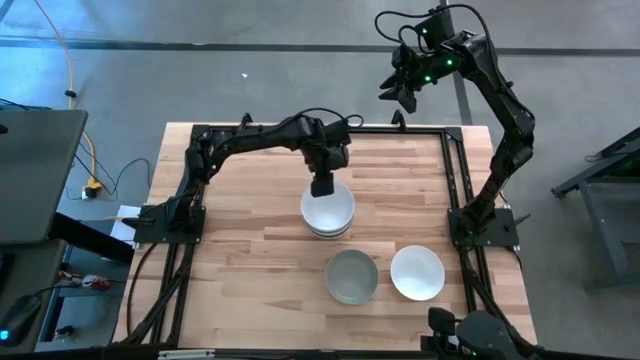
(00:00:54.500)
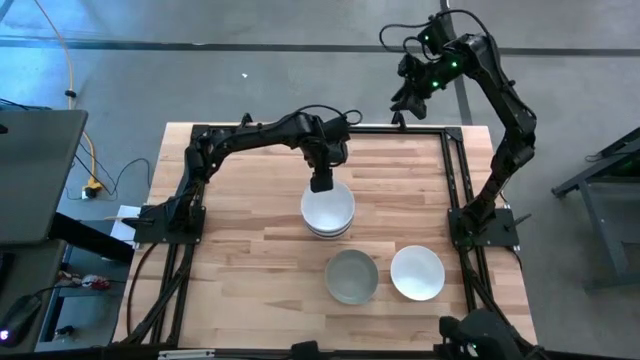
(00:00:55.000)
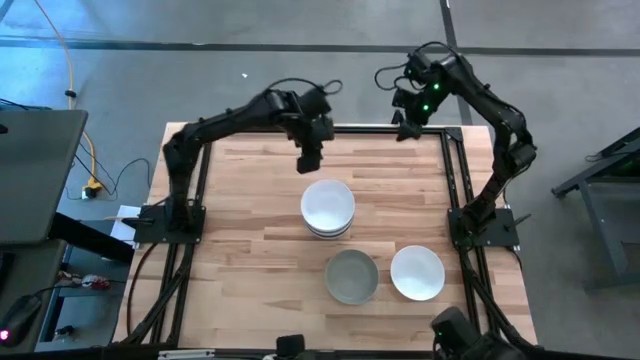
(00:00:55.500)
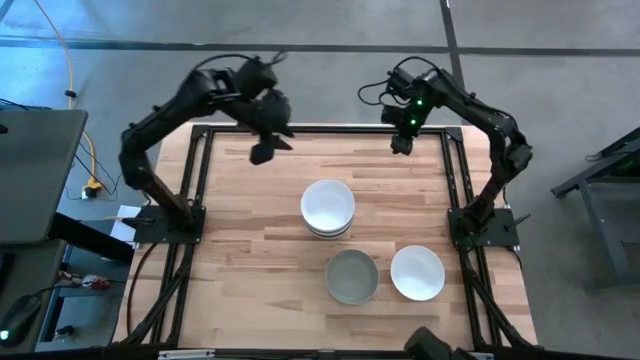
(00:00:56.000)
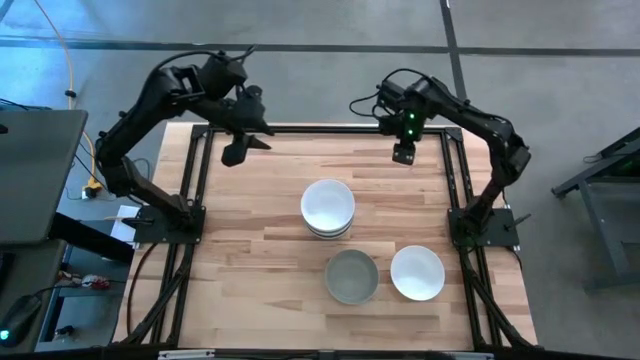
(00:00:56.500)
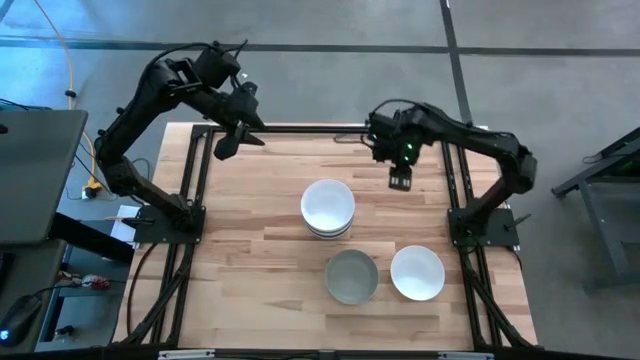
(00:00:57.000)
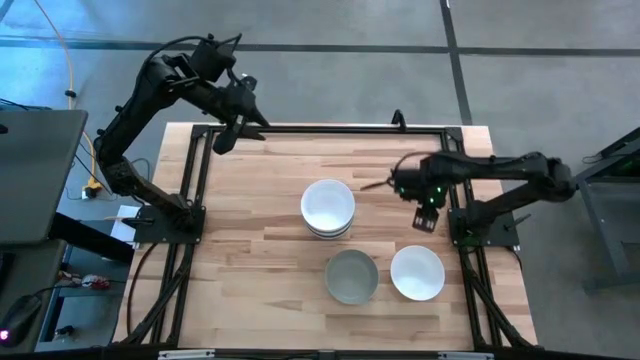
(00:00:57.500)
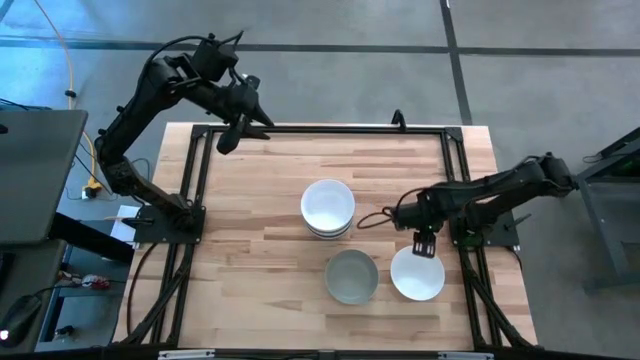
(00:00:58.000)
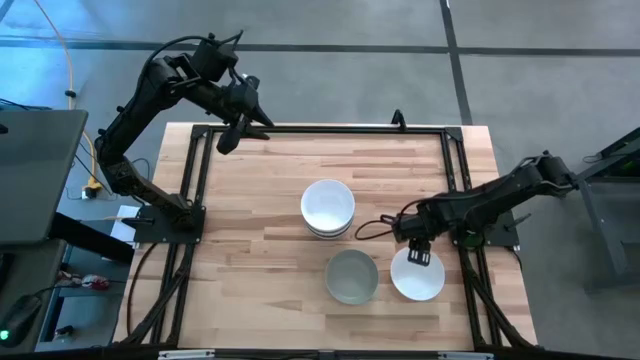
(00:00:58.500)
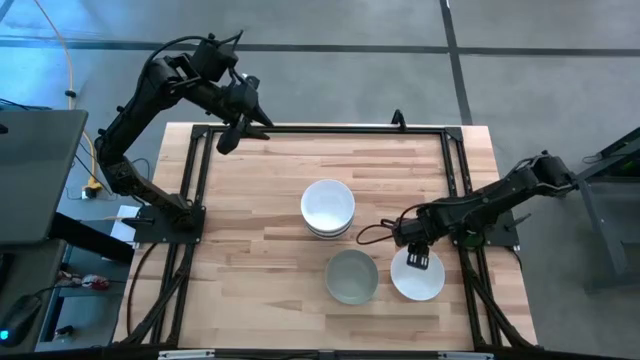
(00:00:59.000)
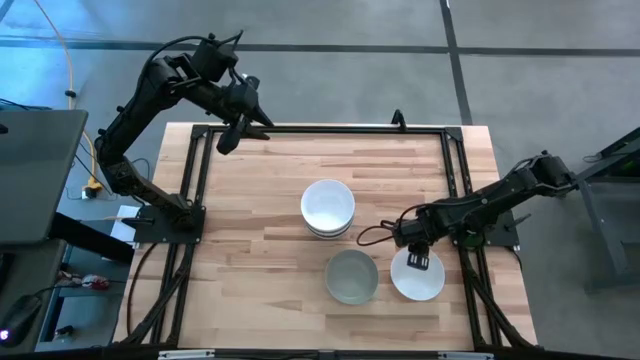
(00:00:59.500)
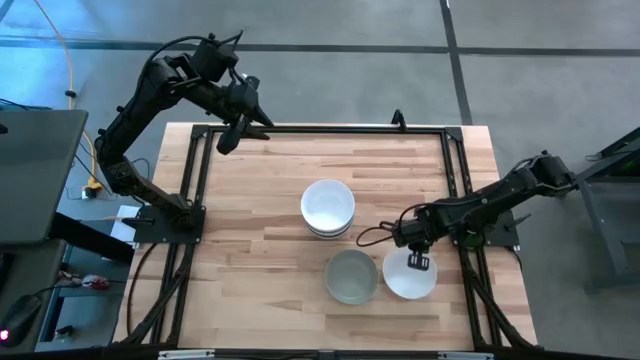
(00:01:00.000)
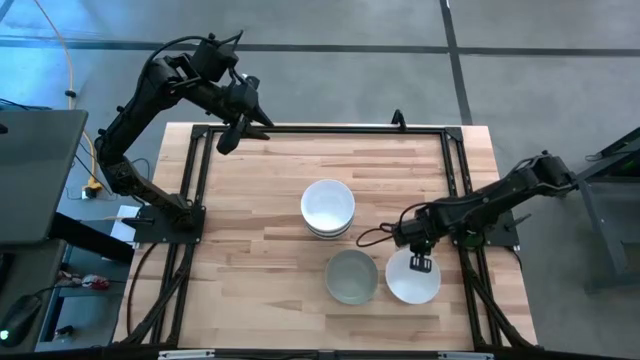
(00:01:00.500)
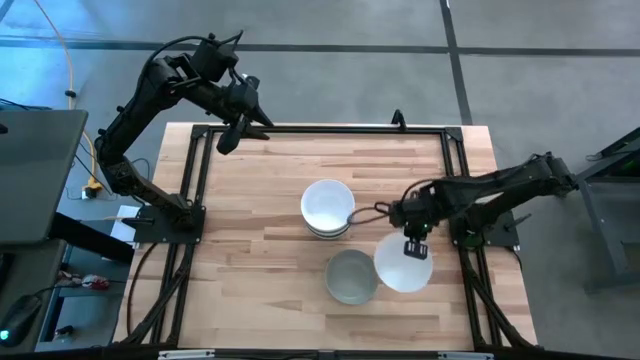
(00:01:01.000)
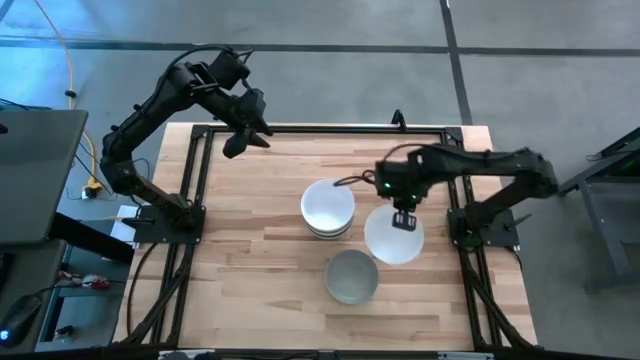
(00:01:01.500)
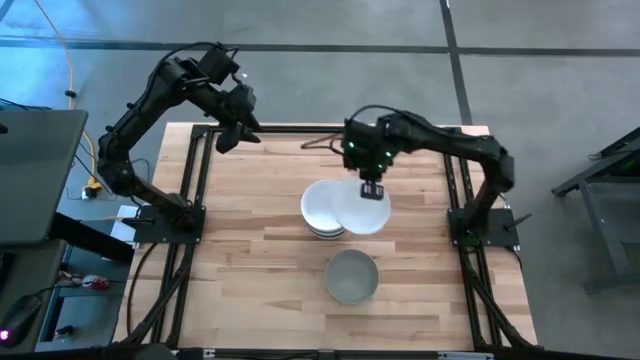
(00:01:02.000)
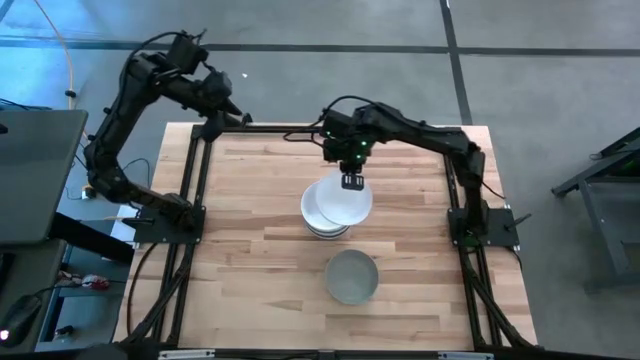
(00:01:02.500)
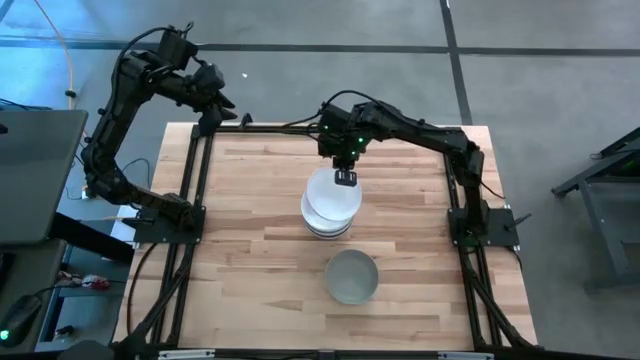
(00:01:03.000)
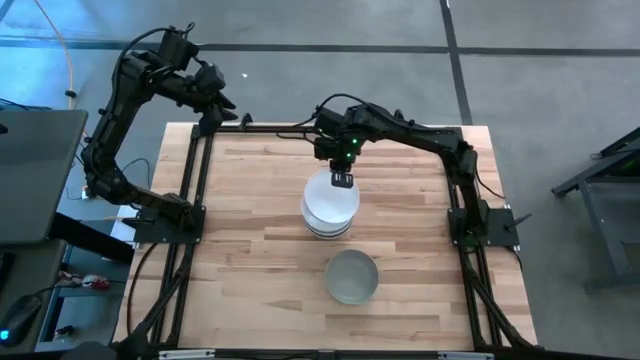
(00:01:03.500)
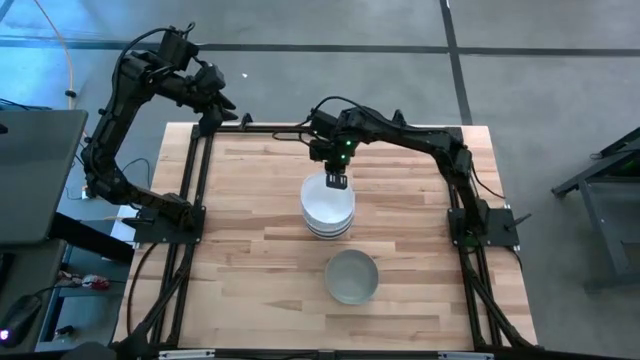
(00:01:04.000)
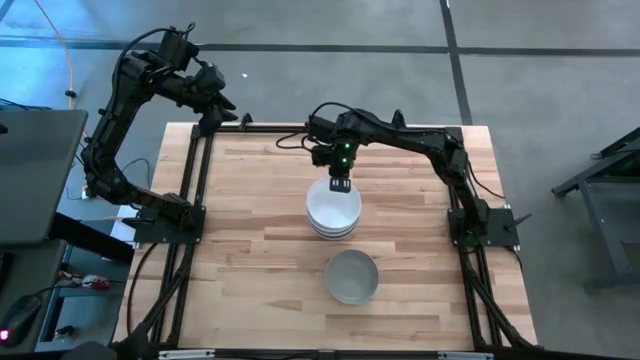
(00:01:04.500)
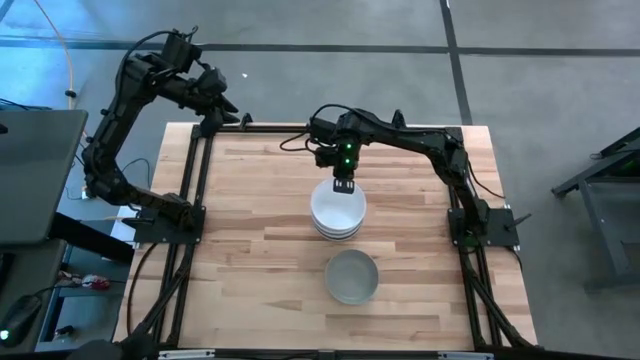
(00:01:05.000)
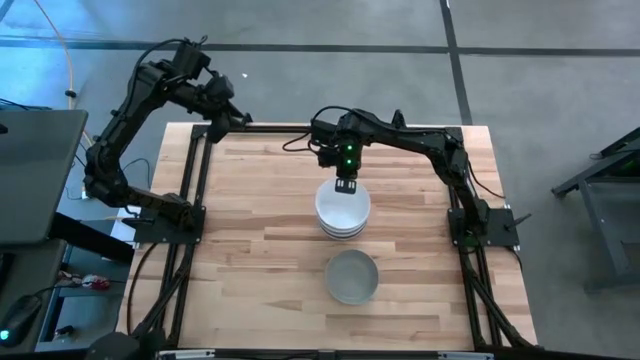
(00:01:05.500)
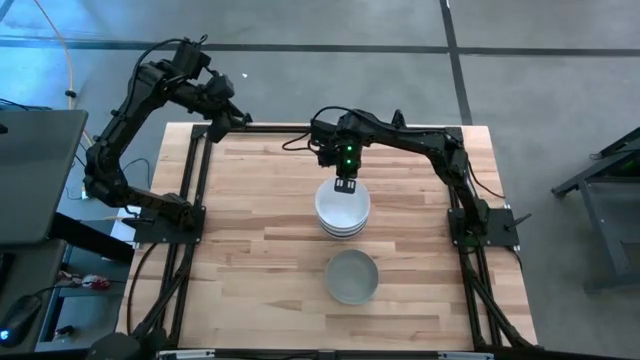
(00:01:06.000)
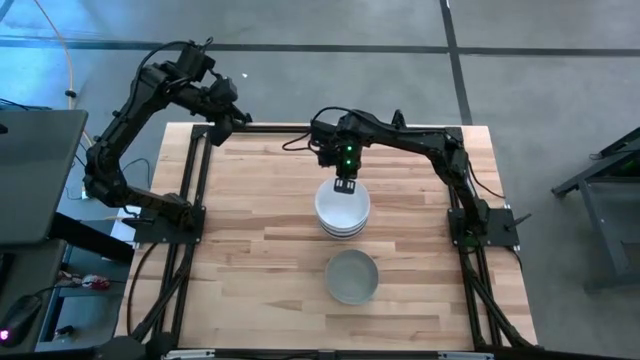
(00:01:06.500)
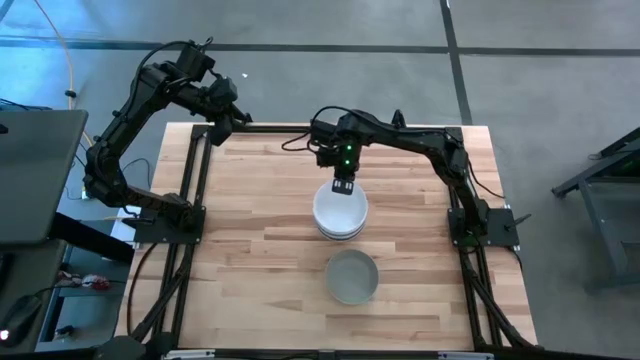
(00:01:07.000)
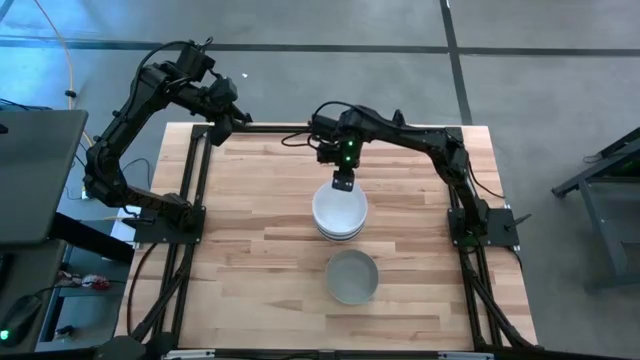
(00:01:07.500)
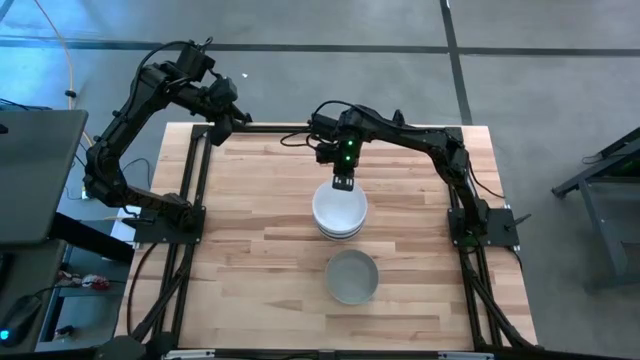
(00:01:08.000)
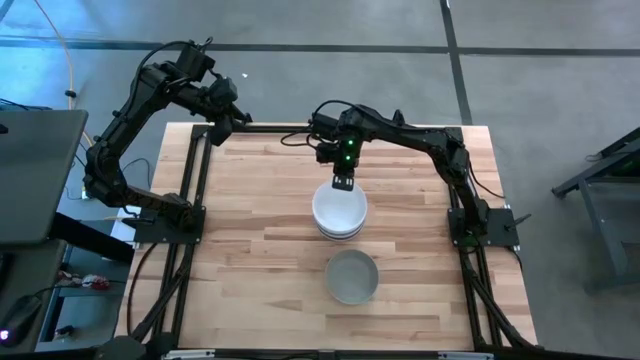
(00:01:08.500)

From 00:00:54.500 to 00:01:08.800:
Task: Nest bowls inside each other
Stack the white bowl on top of the white bowl

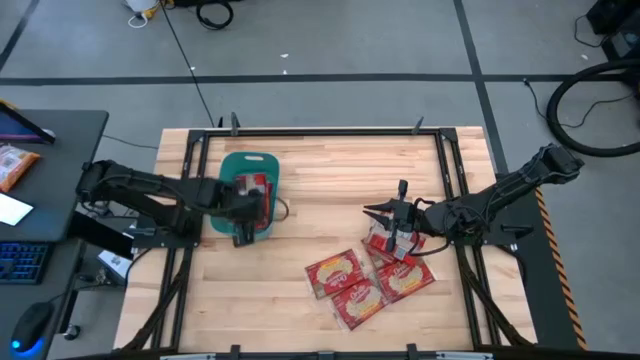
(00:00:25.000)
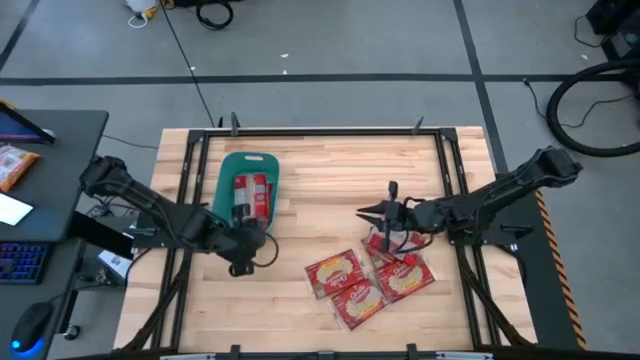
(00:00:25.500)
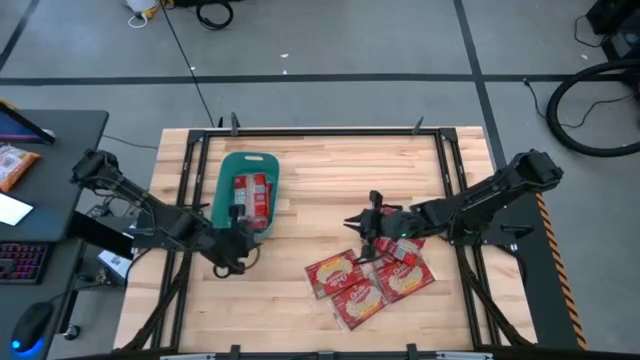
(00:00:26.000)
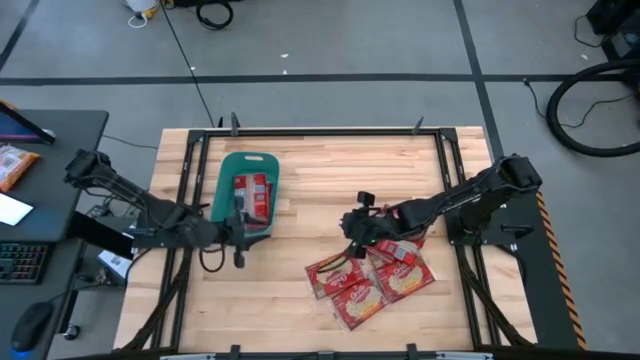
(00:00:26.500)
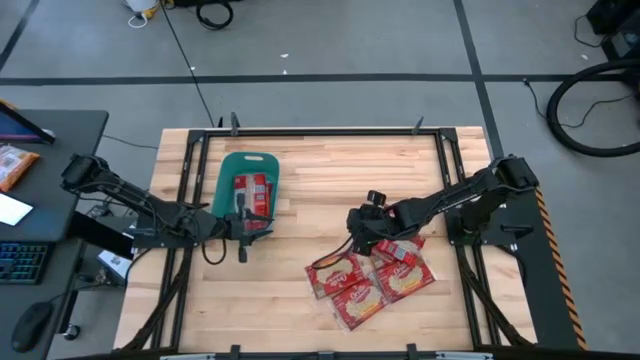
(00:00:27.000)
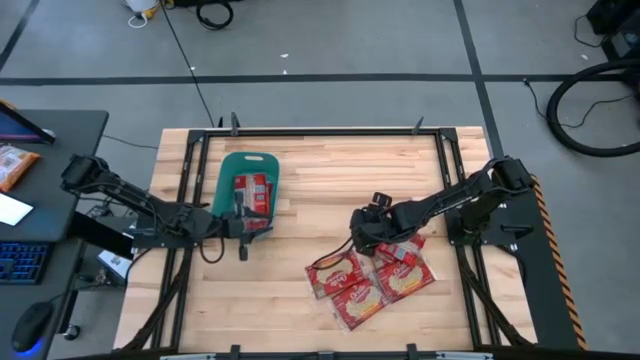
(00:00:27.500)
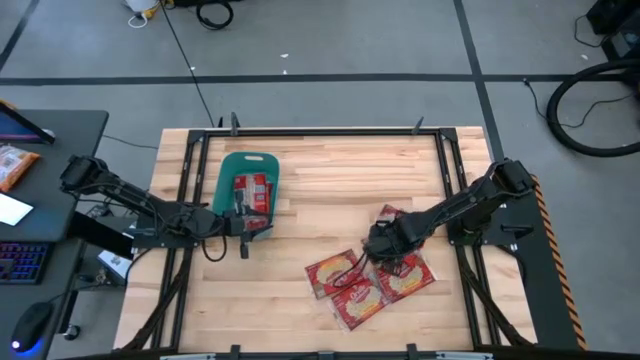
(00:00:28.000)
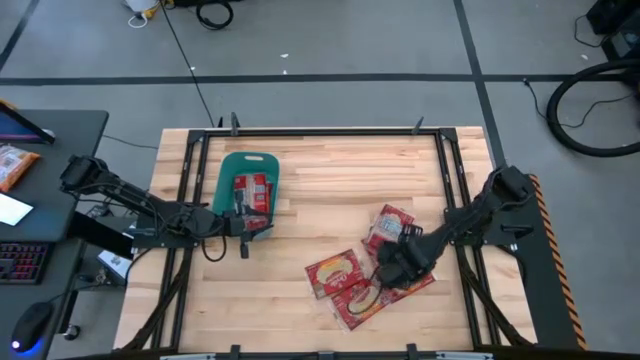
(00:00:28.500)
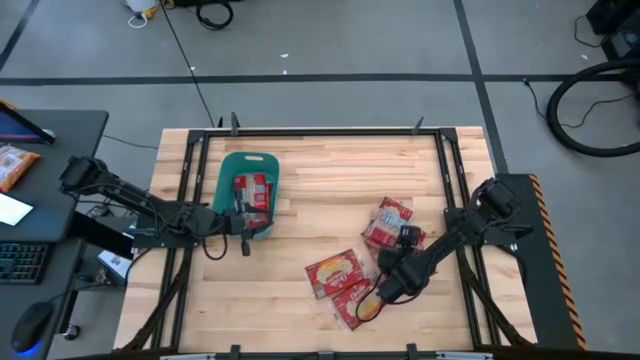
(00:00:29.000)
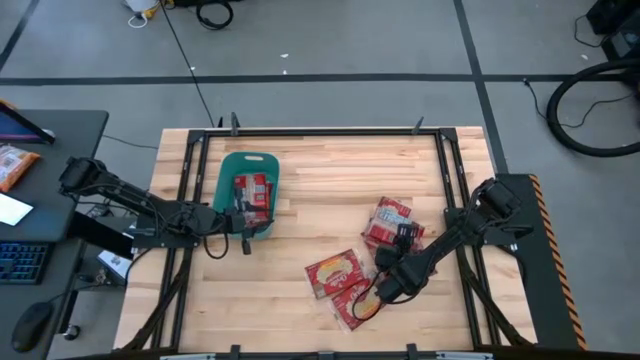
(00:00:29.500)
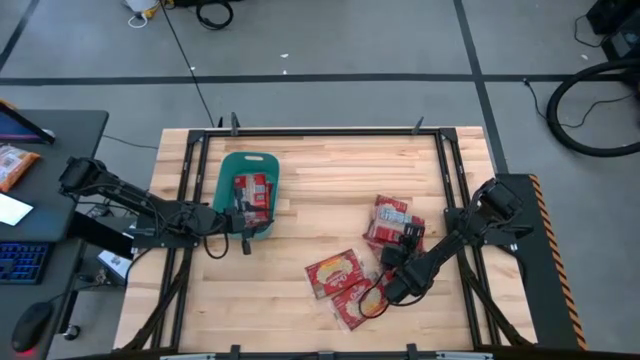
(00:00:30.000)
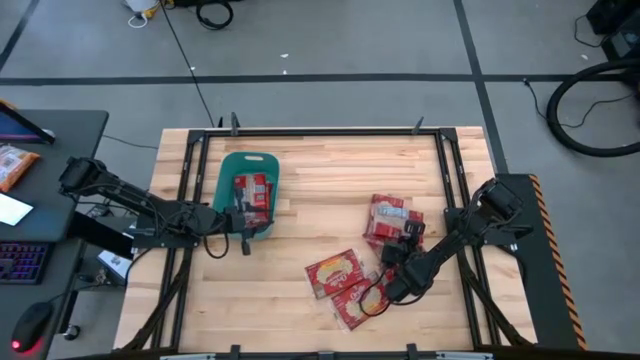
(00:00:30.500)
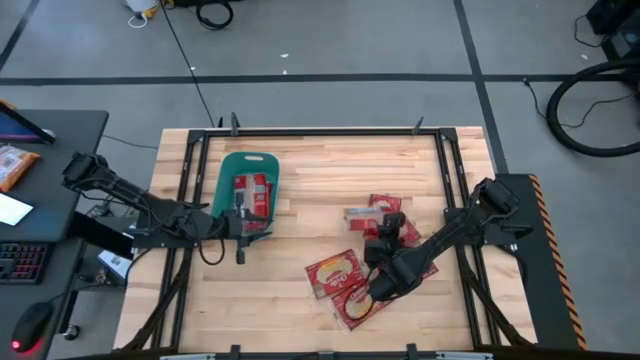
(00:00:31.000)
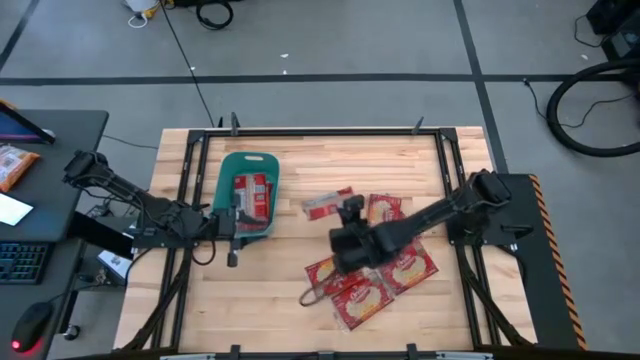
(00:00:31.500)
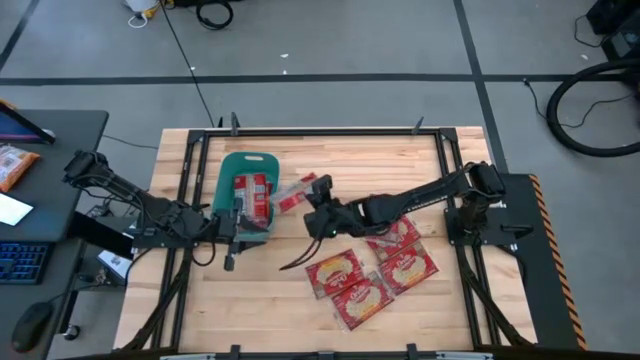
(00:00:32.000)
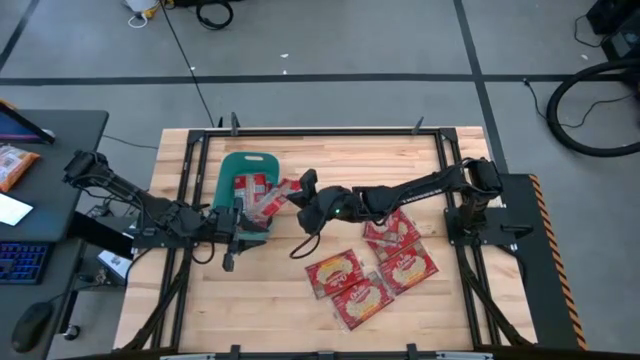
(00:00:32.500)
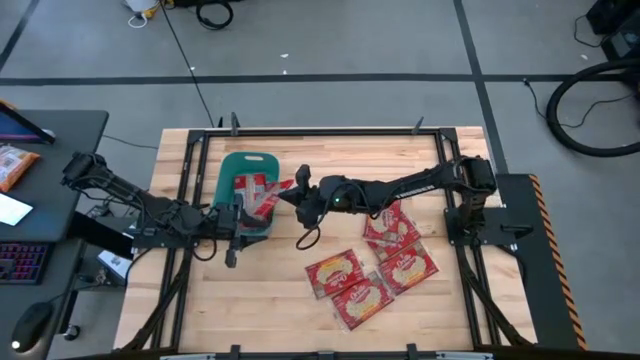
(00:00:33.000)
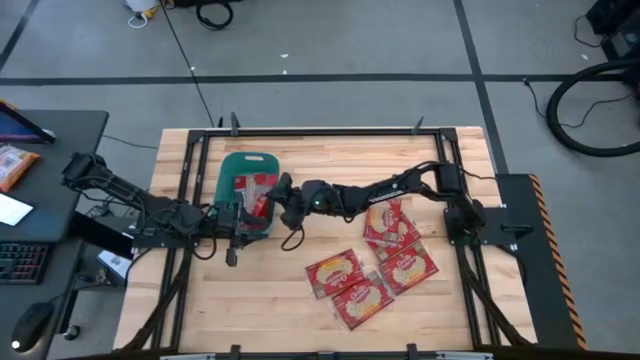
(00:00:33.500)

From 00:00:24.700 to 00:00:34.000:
Task: Sort popcorn bags into baskets
Put the red popcorn bag into the green bin
